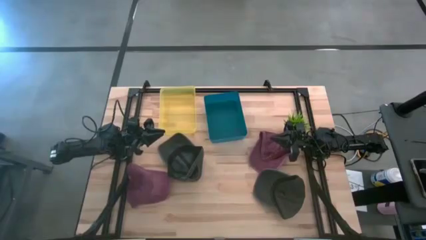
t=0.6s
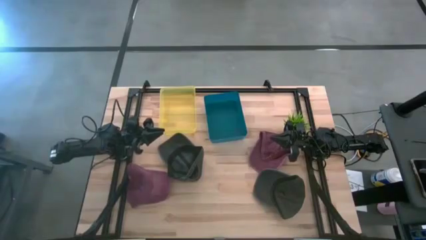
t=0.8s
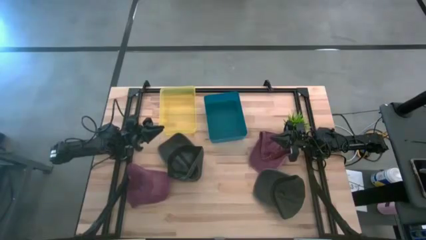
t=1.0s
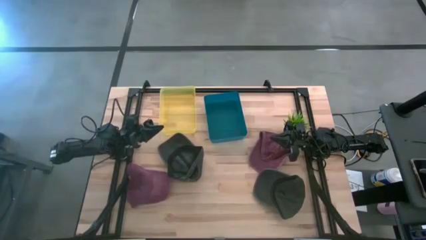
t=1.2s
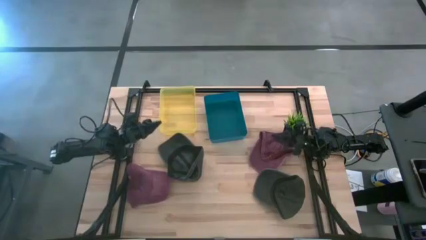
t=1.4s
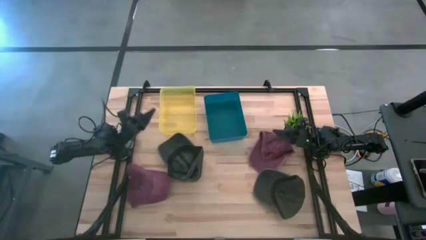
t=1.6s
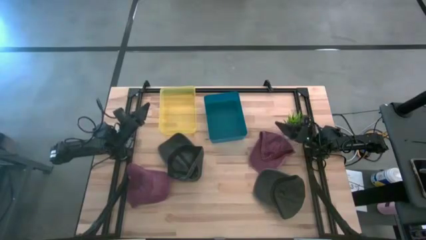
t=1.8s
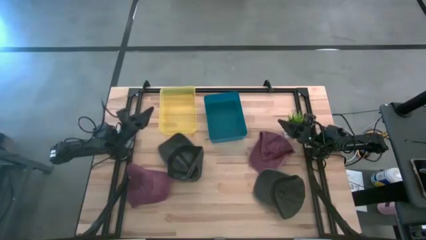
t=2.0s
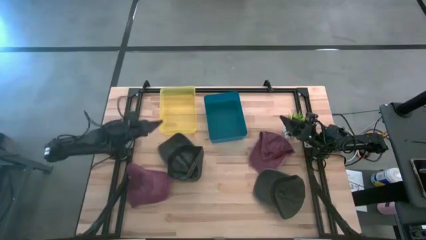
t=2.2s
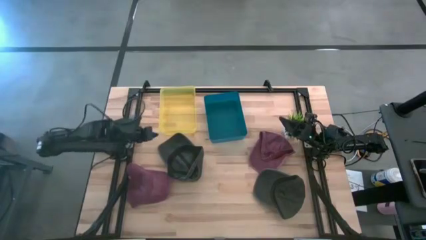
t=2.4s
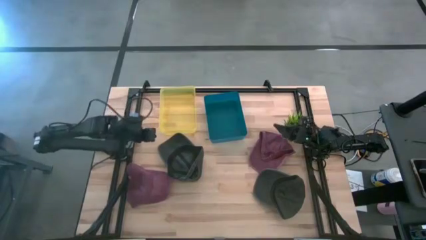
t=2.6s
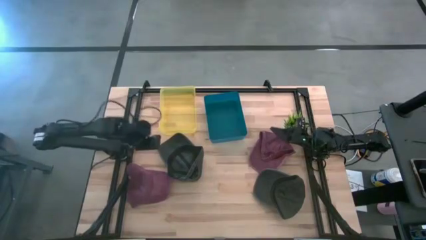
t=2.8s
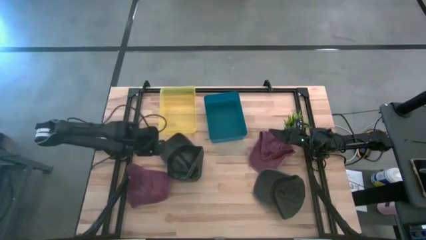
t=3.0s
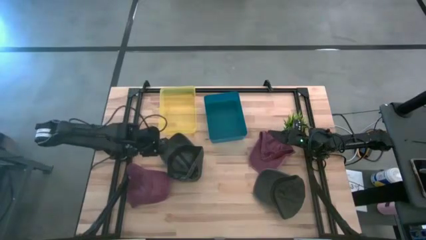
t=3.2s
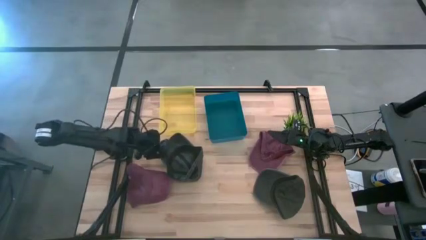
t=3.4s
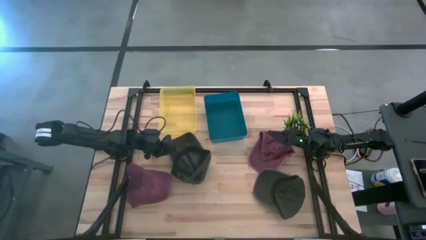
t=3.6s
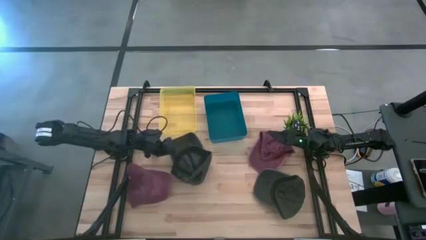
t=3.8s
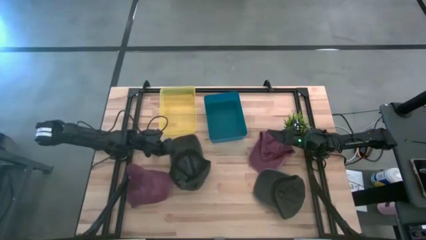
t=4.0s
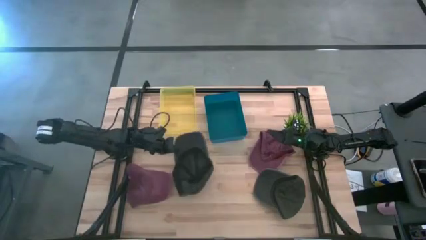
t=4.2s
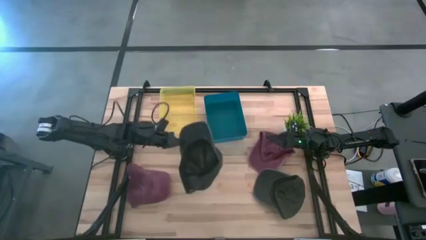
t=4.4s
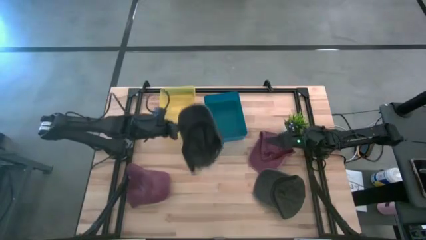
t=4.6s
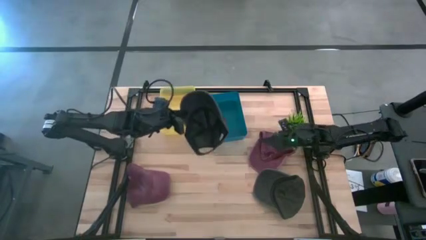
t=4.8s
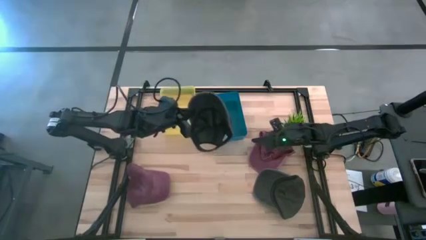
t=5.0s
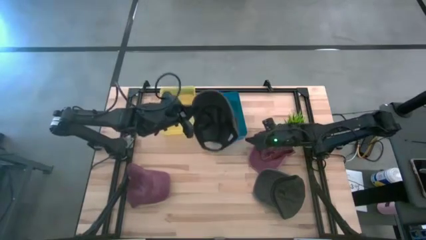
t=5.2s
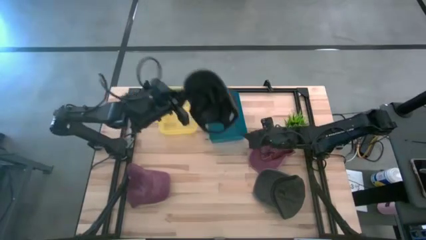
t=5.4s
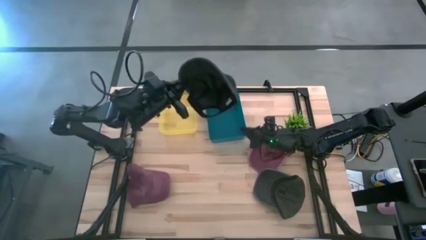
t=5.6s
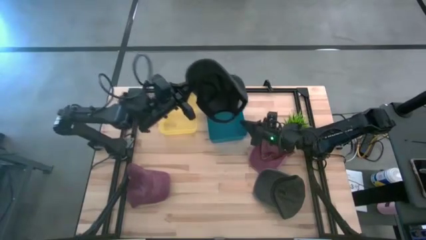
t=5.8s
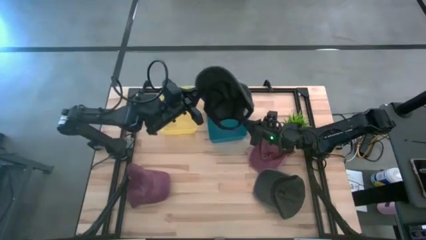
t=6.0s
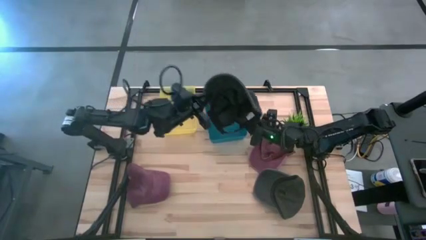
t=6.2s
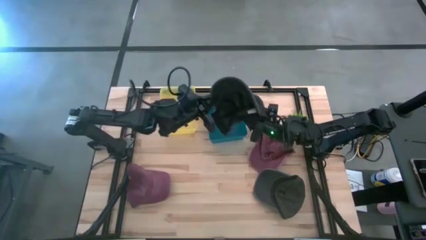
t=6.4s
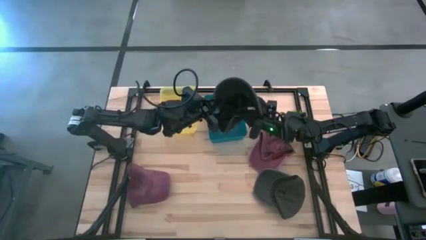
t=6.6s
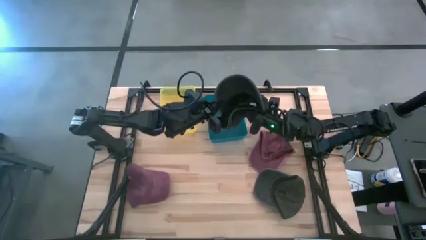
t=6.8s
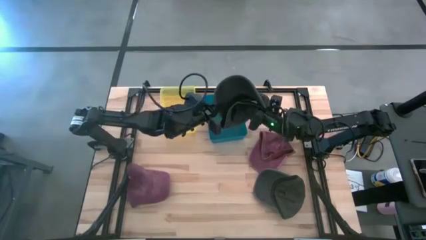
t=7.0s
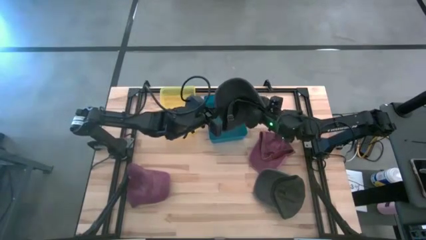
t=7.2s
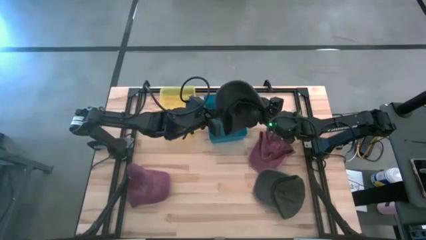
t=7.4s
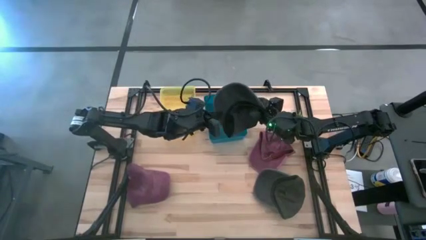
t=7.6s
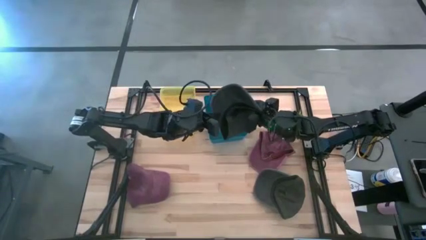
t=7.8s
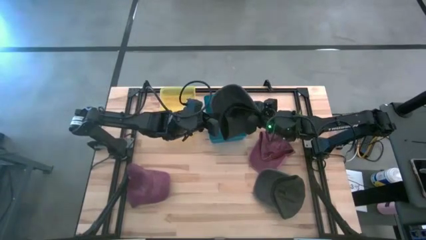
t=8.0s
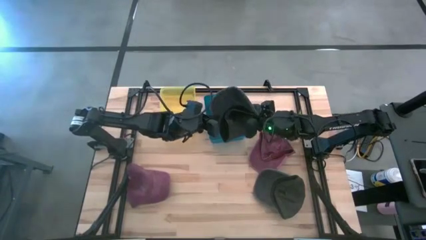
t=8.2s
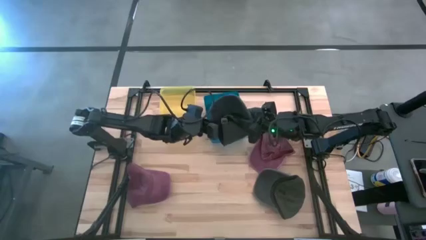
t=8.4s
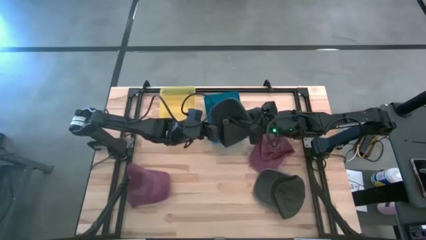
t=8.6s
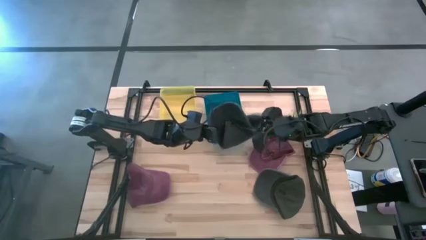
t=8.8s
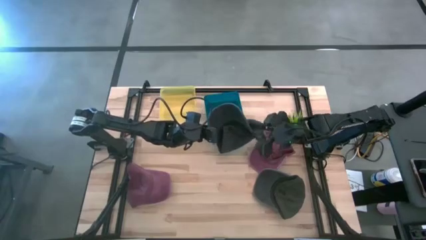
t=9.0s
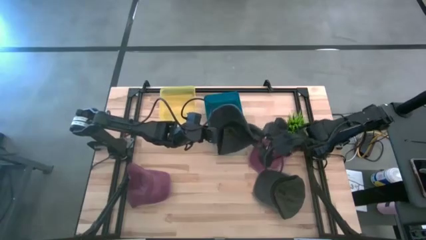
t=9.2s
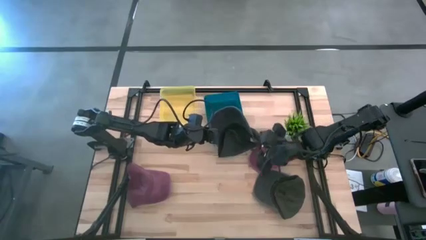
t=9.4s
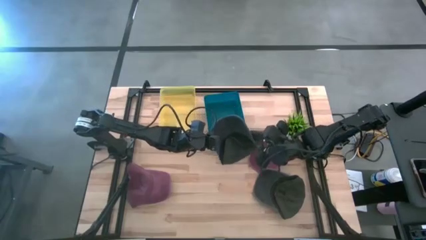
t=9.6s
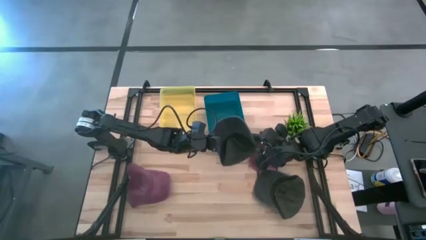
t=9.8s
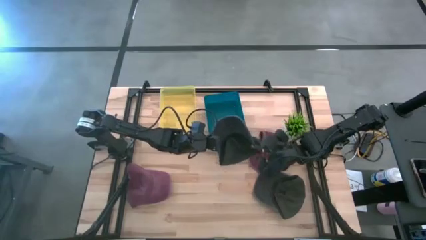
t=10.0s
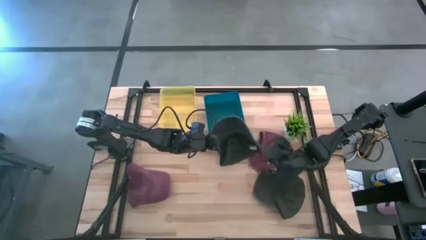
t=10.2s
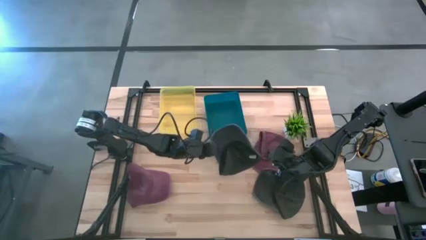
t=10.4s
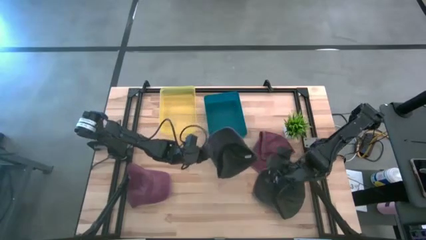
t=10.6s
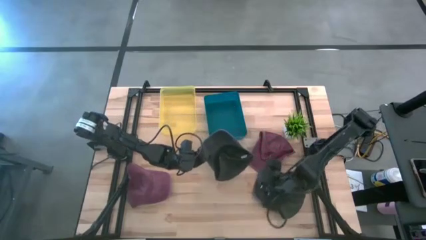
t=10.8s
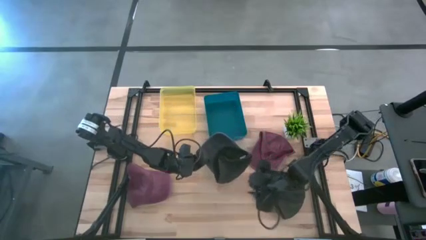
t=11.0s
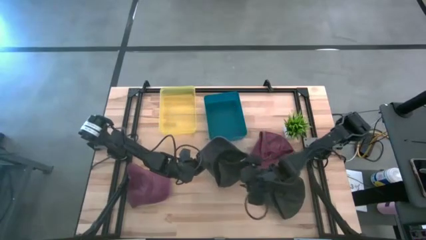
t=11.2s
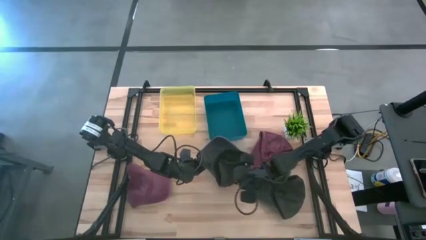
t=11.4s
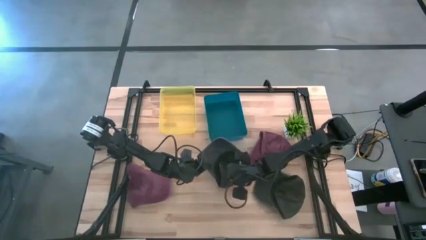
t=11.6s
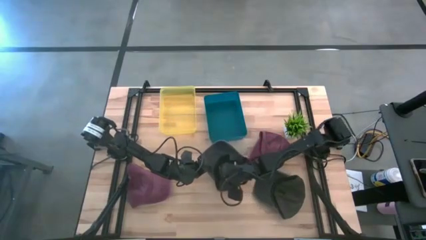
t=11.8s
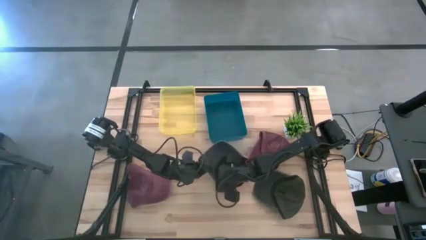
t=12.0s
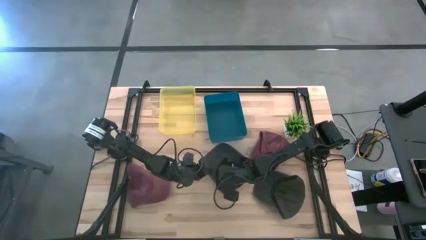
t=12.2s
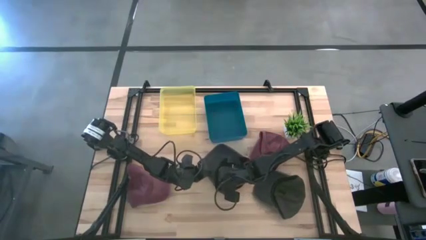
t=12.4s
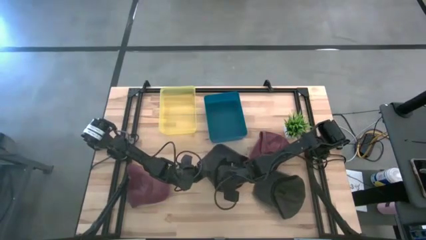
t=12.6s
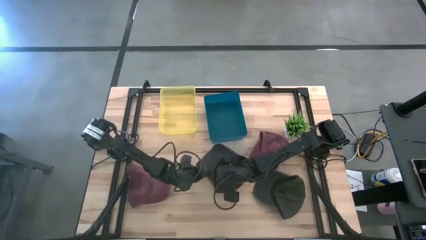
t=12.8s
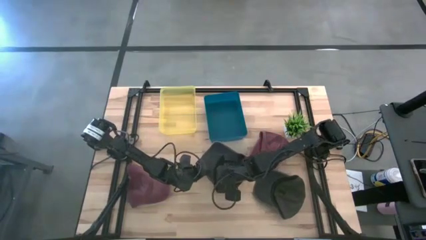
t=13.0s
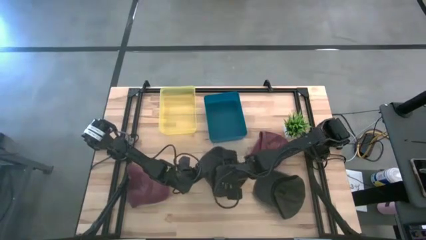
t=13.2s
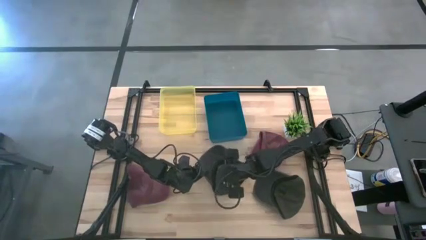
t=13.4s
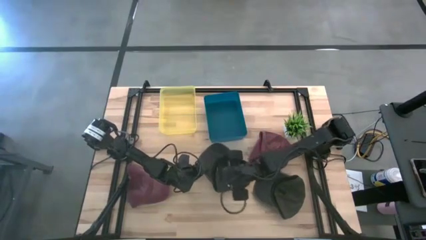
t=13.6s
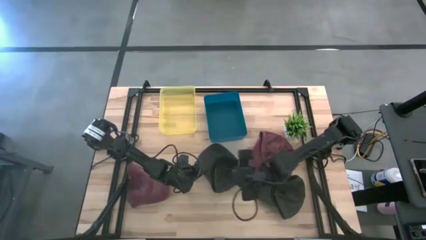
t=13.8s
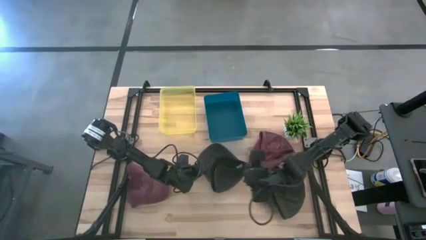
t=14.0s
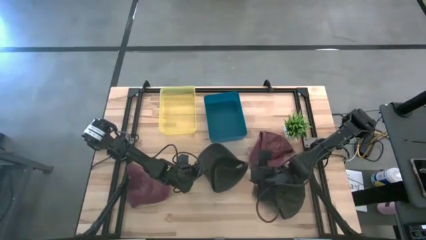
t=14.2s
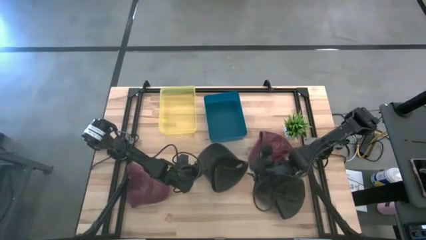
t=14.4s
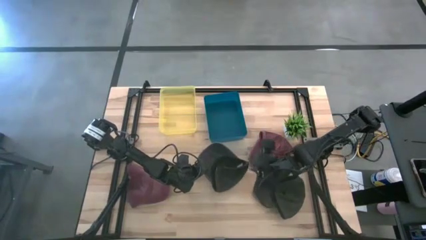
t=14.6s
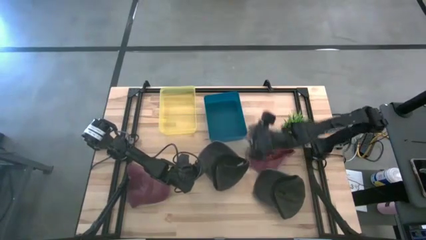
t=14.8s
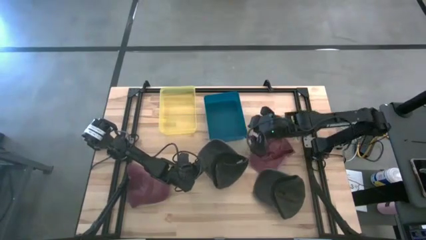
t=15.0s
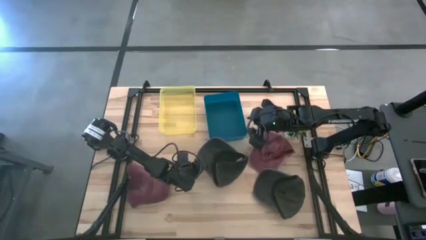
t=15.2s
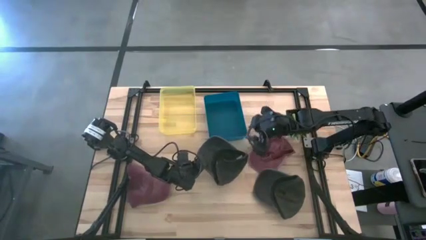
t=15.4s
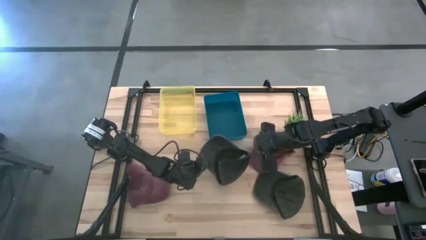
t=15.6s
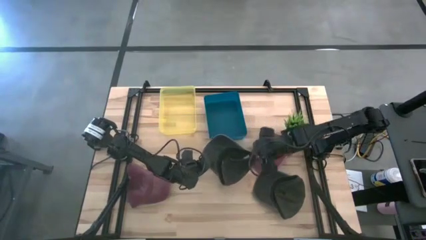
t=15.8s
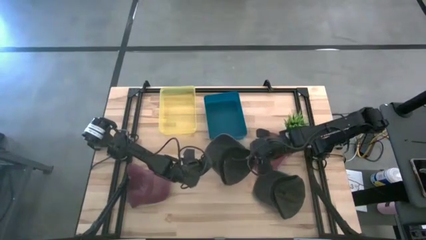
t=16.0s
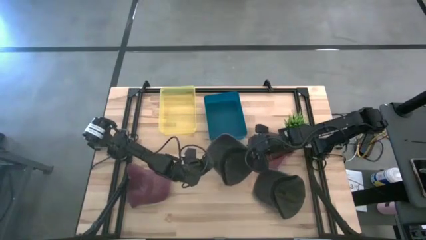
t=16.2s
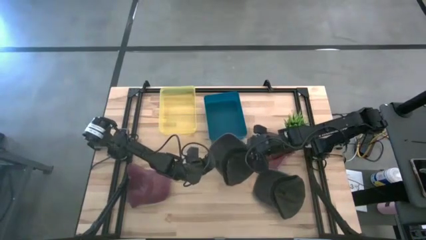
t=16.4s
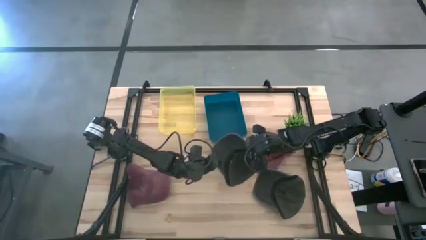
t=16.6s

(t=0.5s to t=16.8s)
Task: Pick & Place hat
Put the top black cap into the yellow bin
